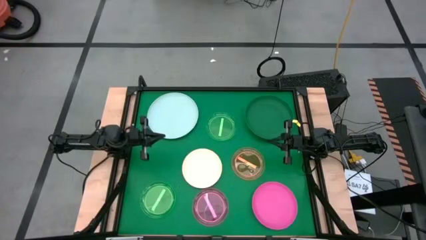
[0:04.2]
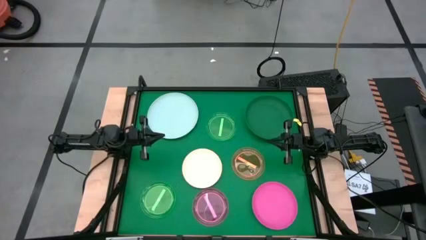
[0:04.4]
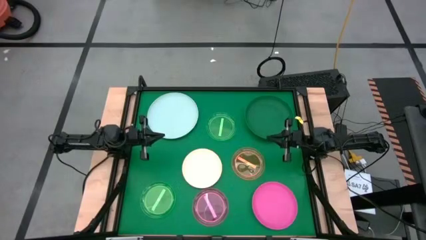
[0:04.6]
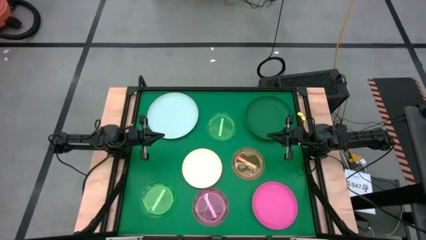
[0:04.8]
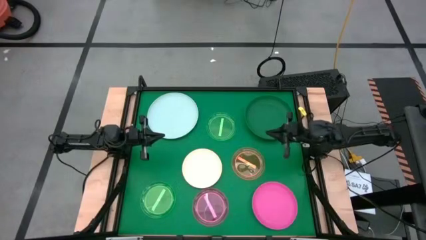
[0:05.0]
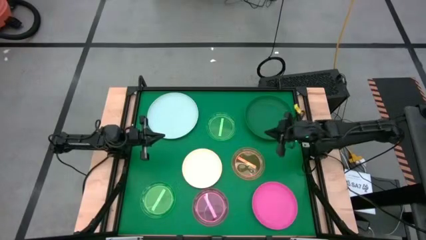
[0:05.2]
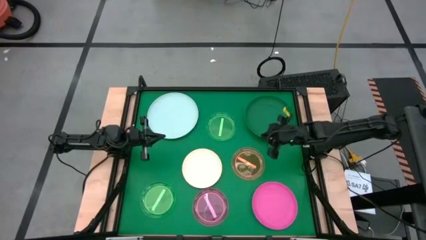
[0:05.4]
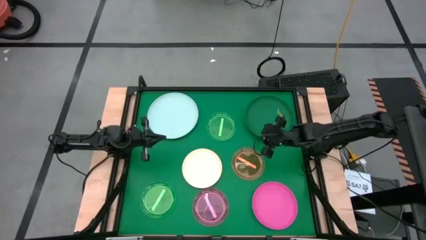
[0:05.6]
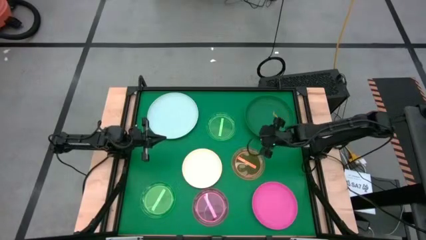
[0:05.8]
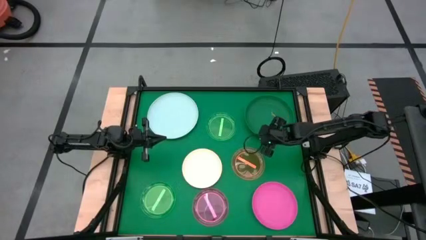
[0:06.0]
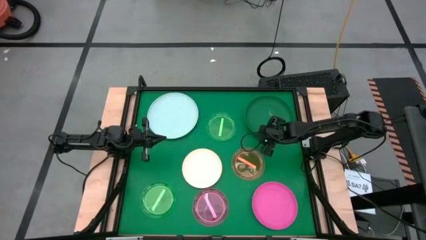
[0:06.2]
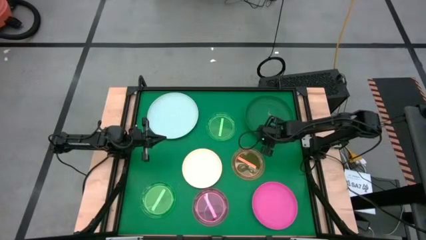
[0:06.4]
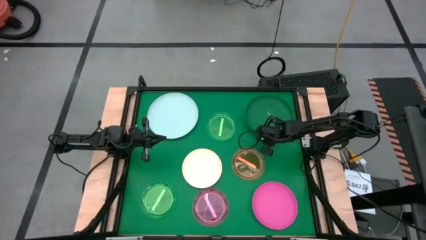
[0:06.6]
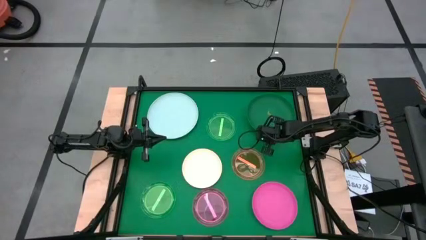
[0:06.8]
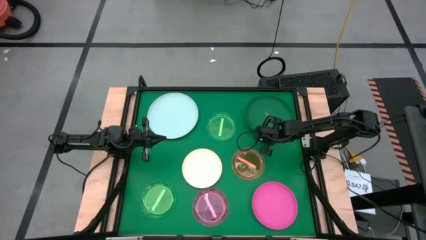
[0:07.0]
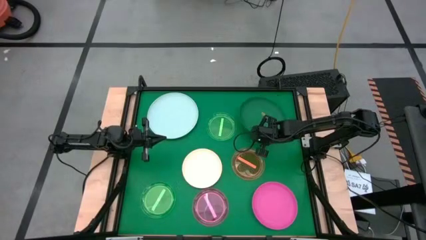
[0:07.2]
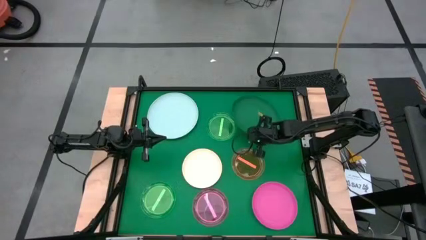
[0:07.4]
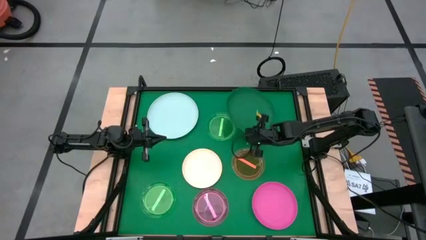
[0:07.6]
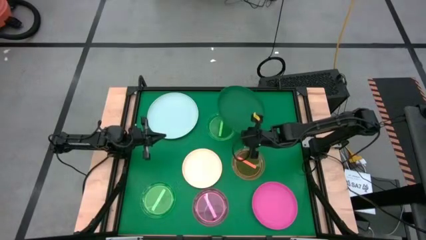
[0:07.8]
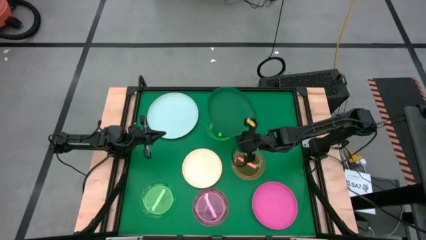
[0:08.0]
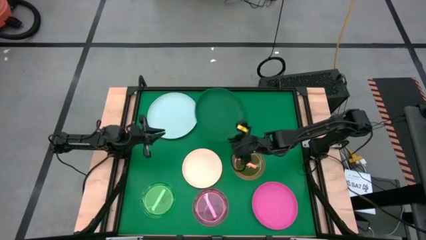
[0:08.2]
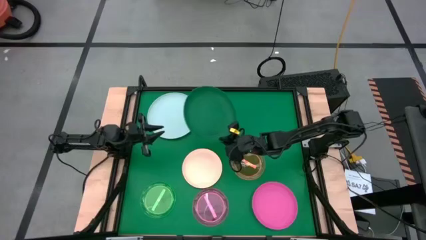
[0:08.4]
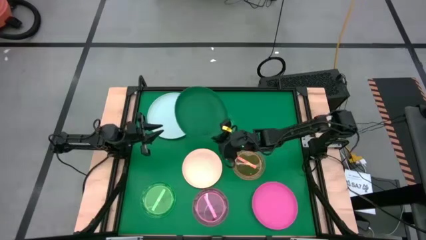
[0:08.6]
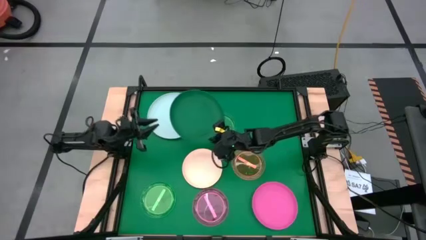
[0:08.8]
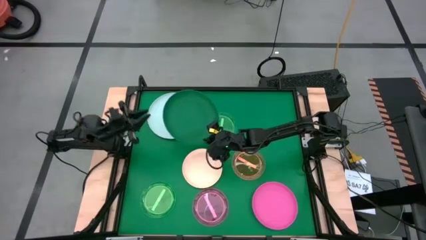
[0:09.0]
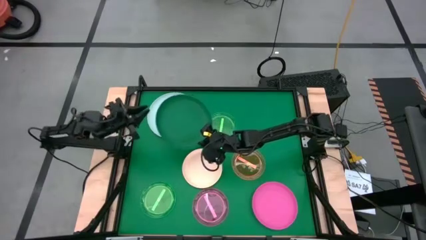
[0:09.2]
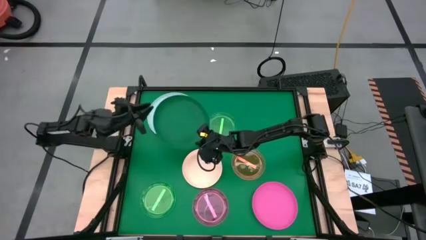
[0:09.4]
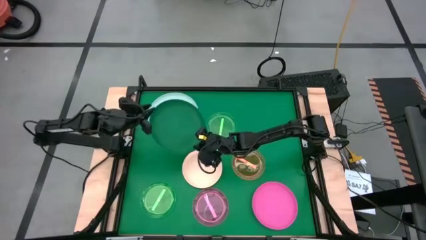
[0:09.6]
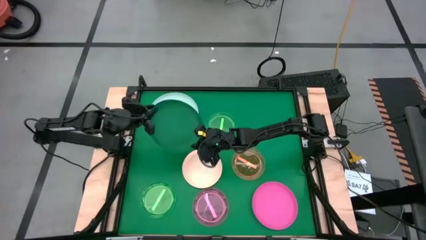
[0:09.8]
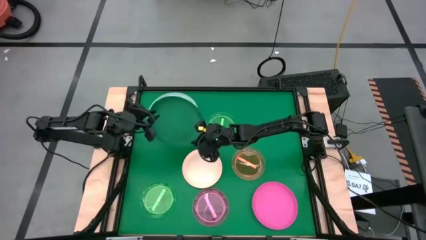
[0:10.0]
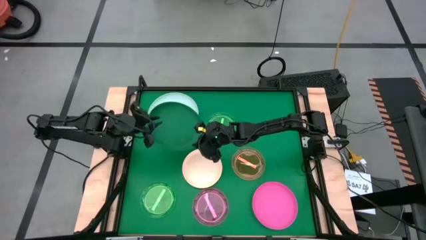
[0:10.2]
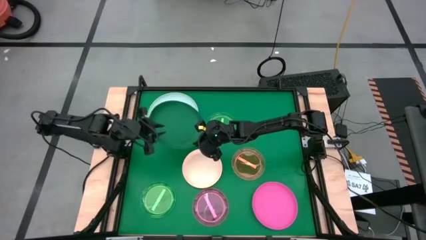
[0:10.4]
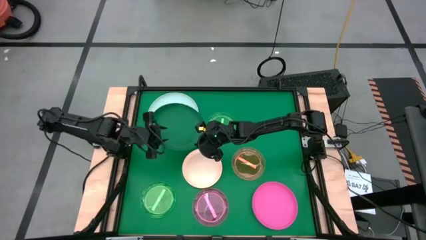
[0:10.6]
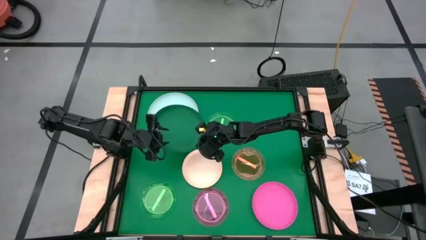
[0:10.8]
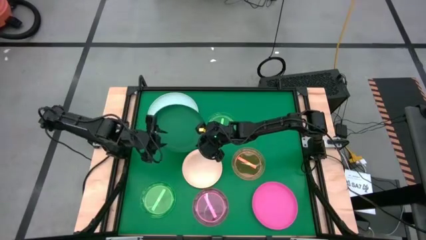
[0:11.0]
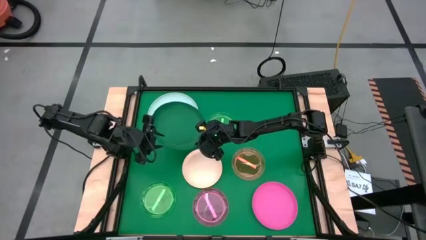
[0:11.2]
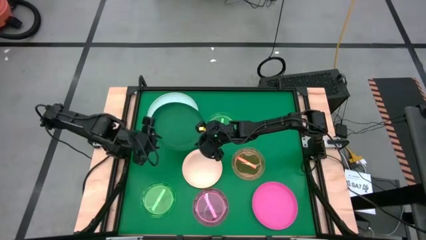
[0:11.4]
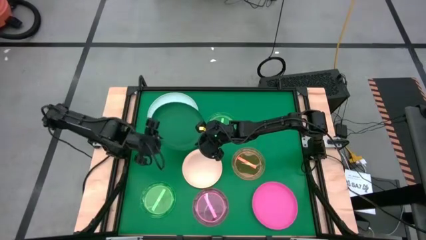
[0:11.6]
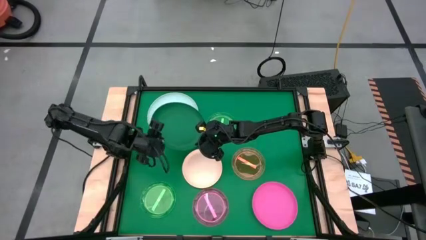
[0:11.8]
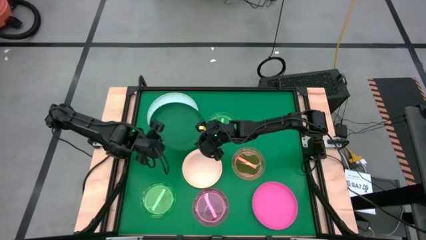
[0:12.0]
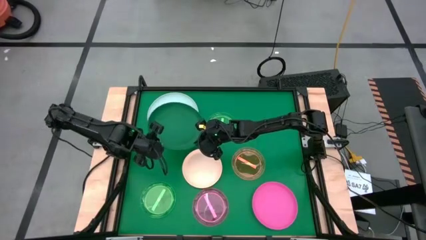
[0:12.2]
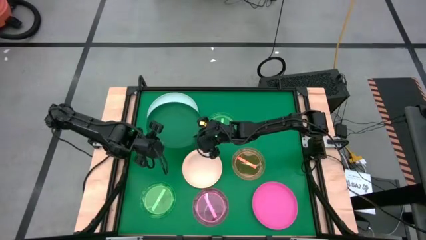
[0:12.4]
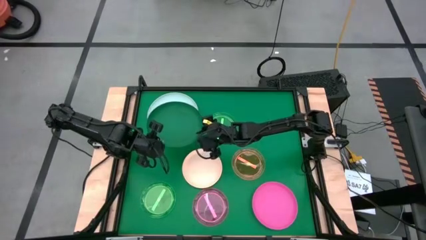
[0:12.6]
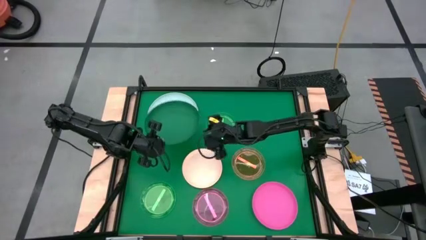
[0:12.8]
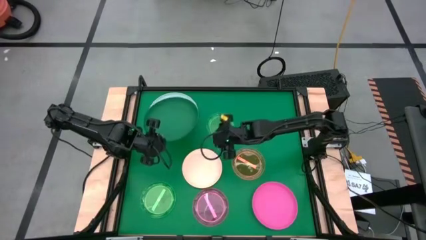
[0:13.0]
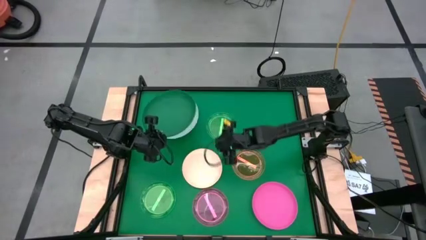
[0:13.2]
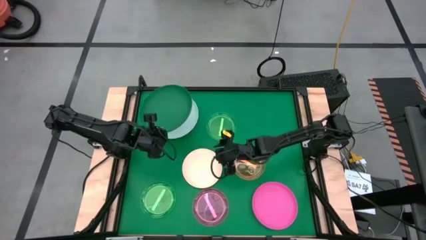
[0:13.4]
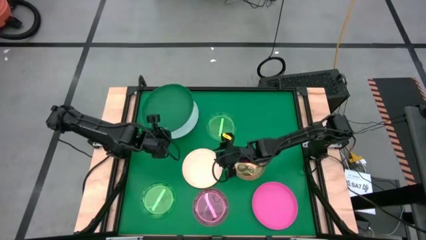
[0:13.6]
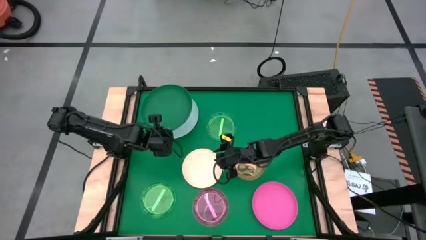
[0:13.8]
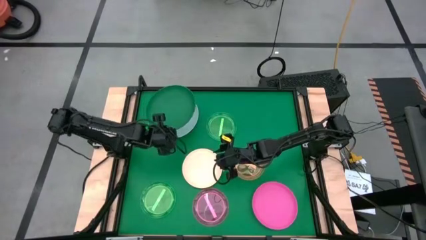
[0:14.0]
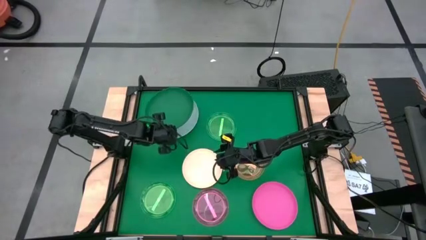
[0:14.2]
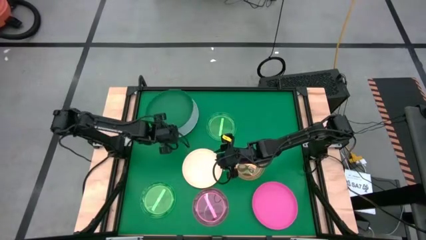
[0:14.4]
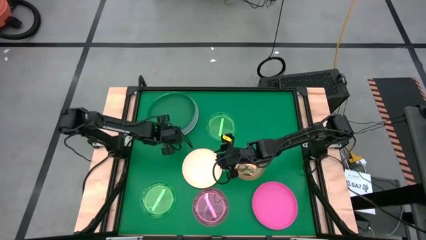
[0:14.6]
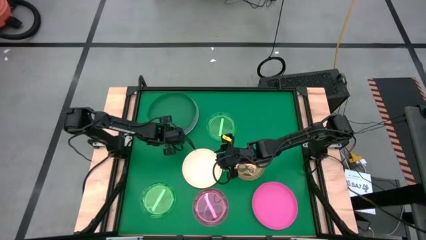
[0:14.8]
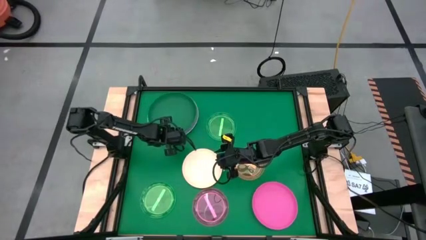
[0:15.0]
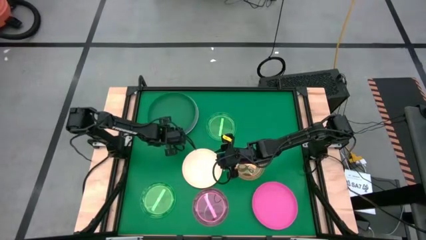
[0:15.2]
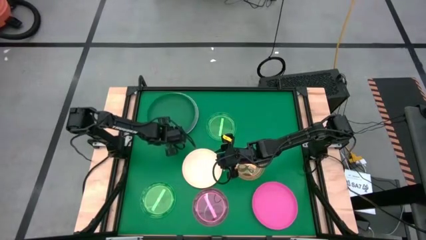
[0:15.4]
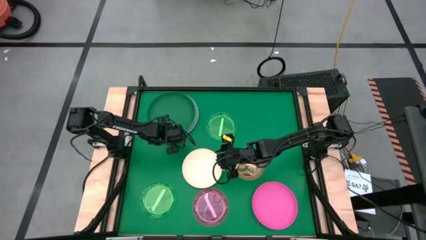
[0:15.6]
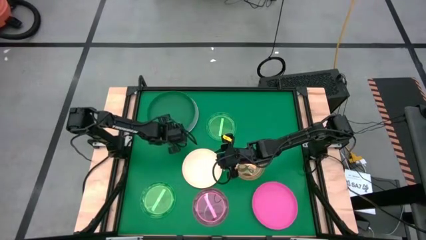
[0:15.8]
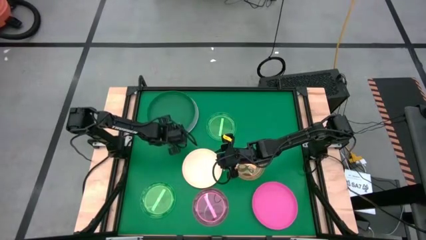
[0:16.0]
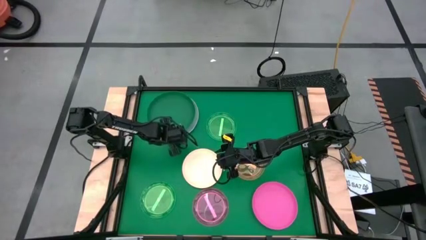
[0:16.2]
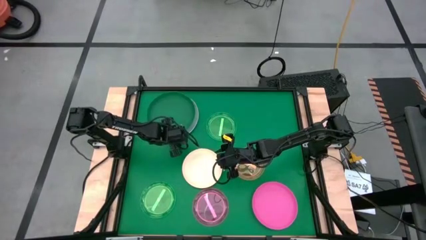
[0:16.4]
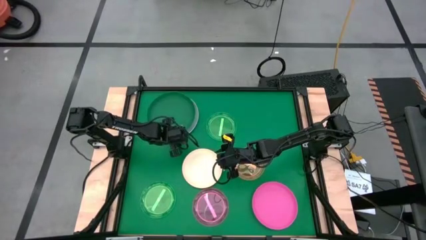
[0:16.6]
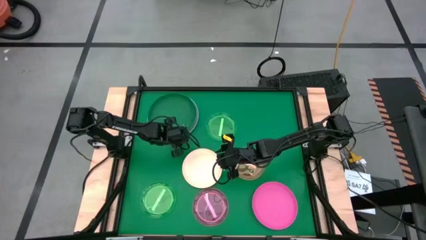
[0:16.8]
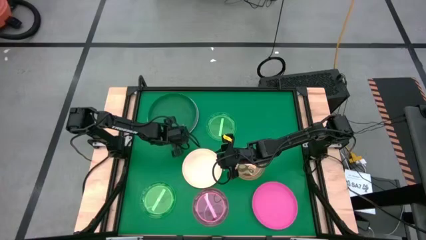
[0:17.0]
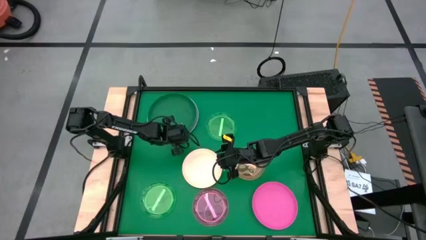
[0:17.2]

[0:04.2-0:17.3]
Task: Stack plastic plates
Stack the dark green plate on the light blue plate
